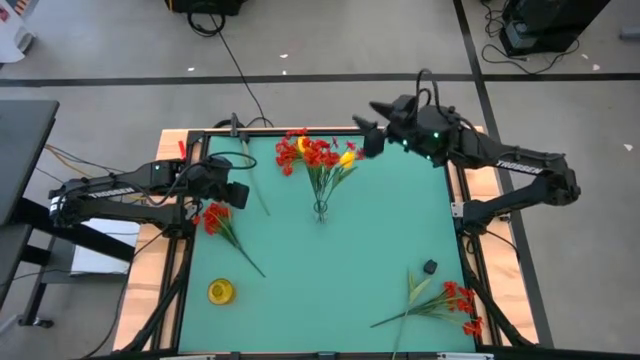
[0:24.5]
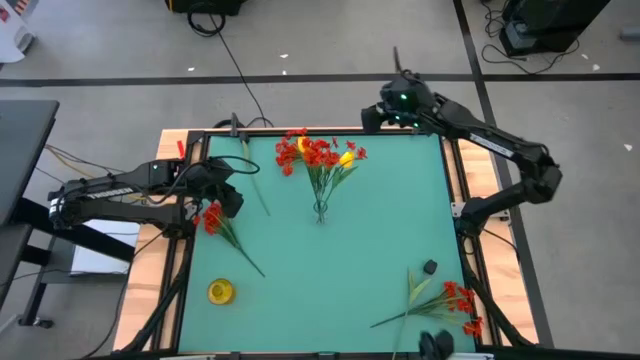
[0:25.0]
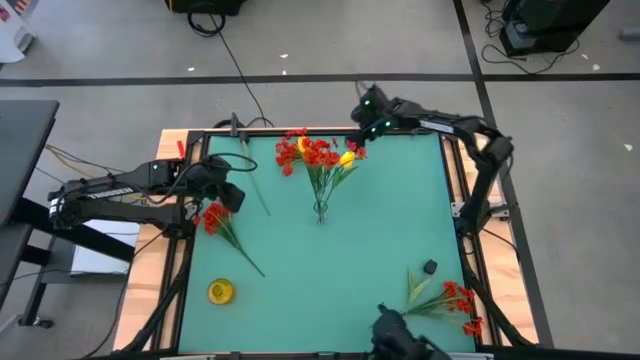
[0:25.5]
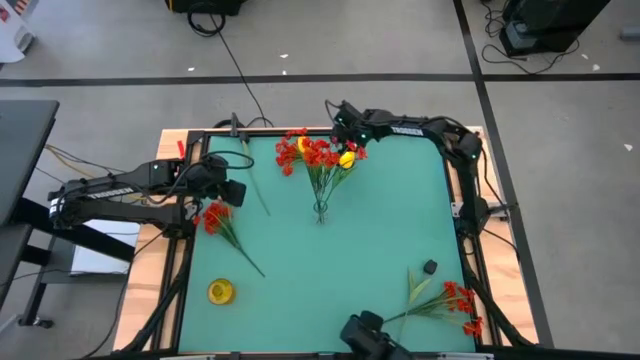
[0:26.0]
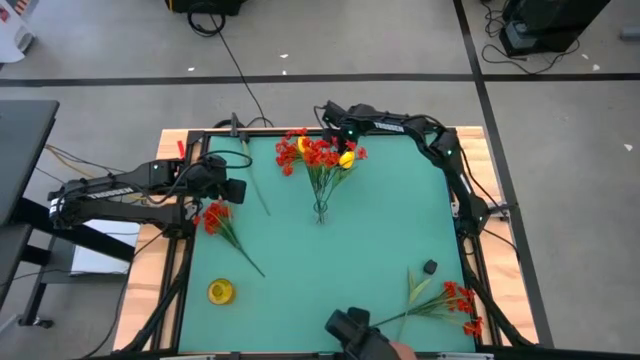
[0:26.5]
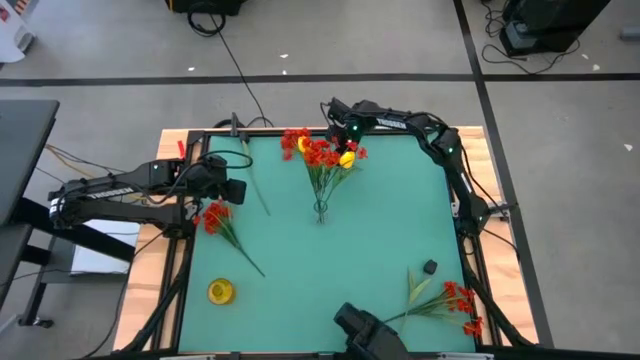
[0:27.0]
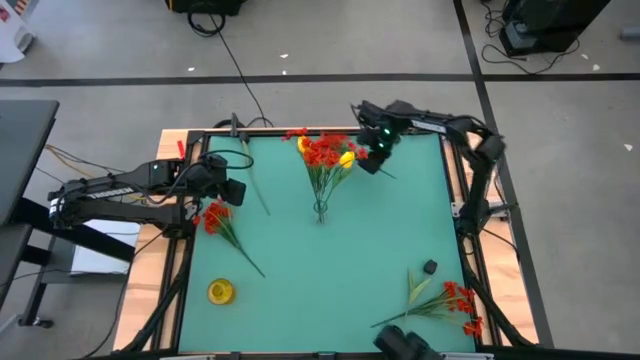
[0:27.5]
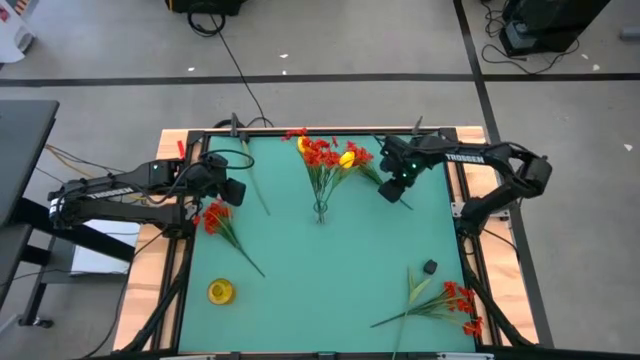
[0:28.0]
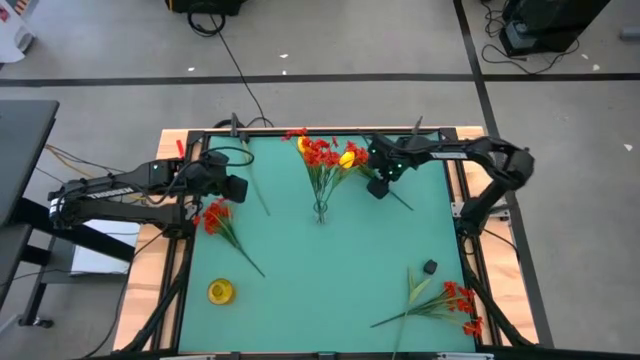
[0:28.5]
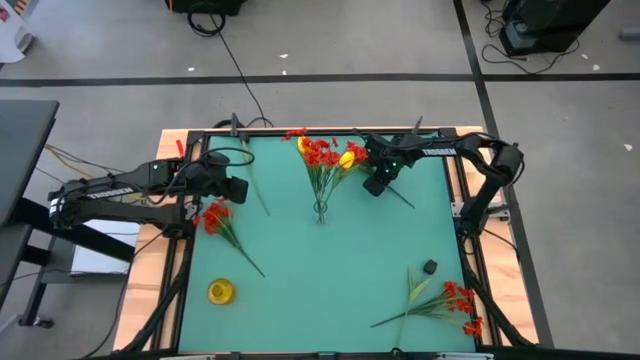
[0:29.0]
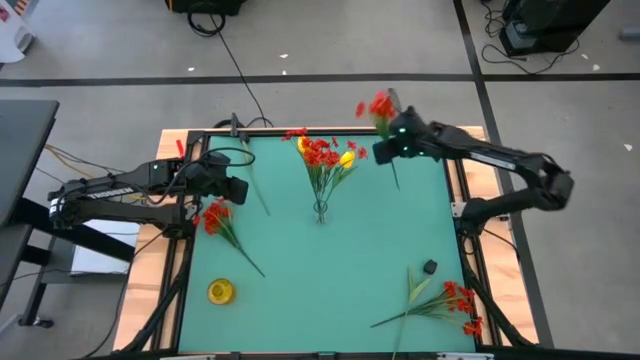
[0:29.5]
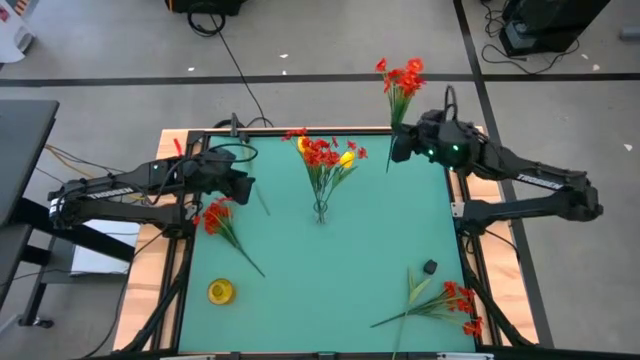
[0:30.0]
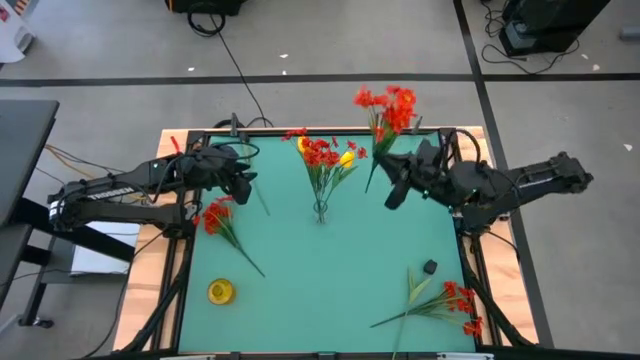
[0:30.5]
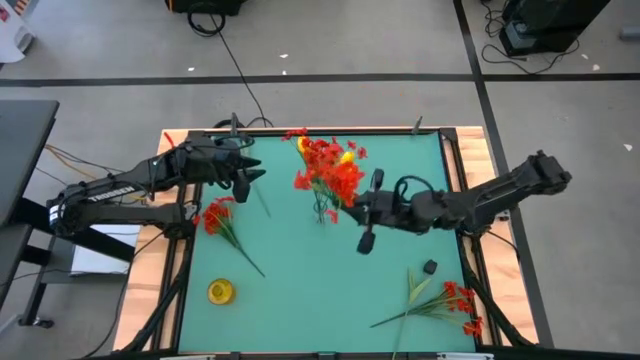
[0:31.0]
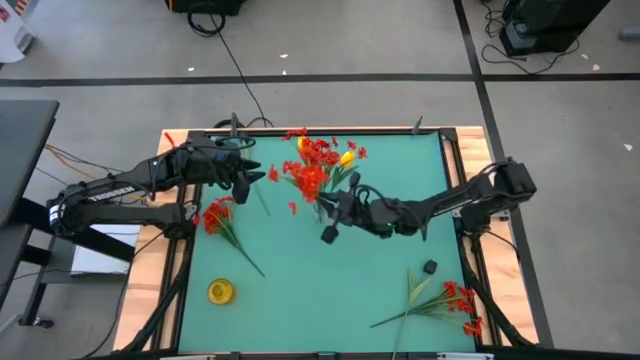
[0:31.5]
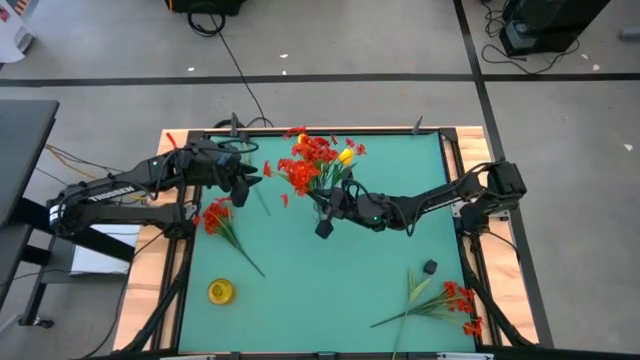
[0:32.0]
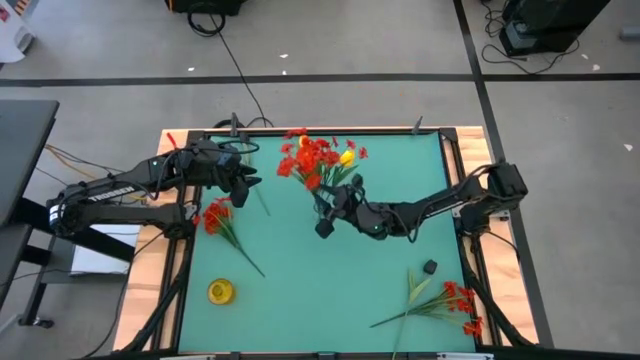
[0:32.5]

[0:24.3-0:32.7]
Task: Sort flowers into vase by color
Put the red flowers into the transparent vase

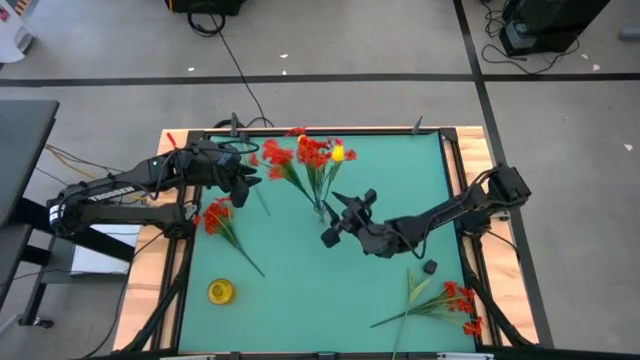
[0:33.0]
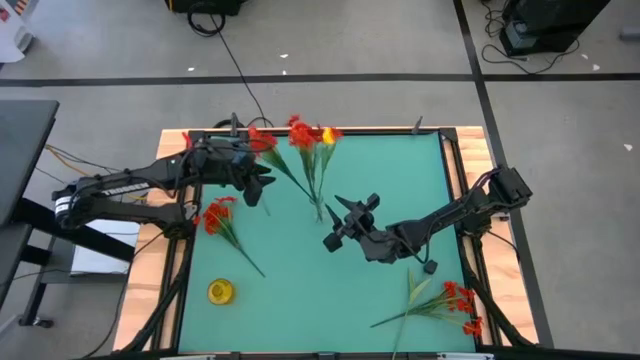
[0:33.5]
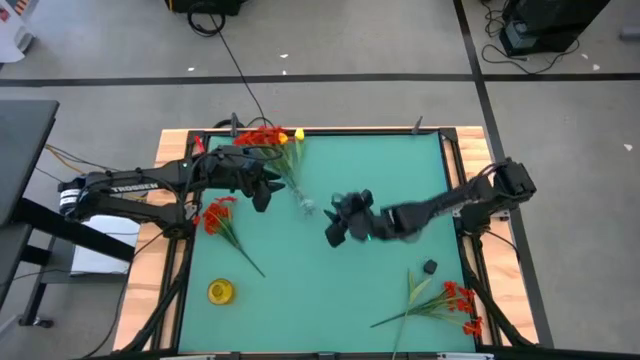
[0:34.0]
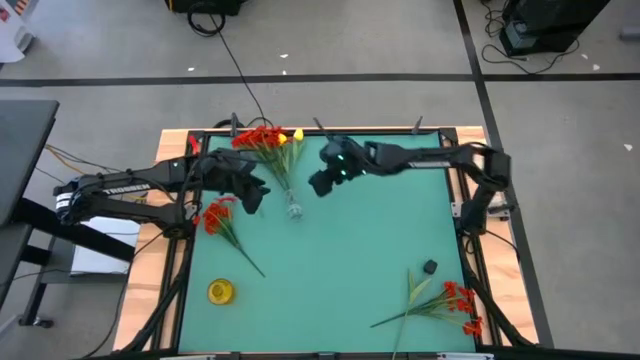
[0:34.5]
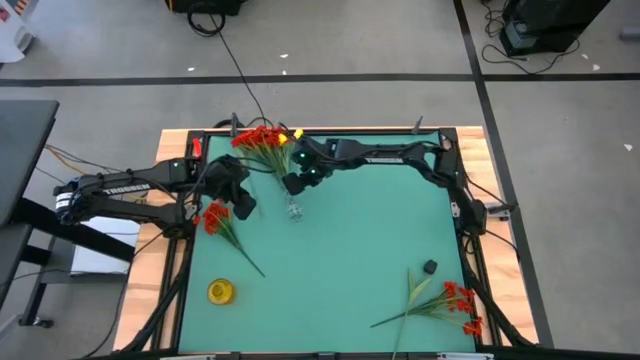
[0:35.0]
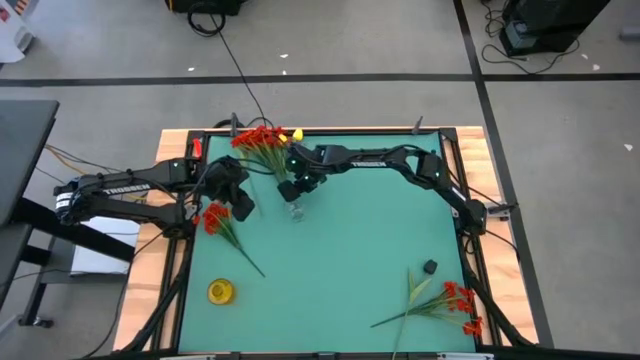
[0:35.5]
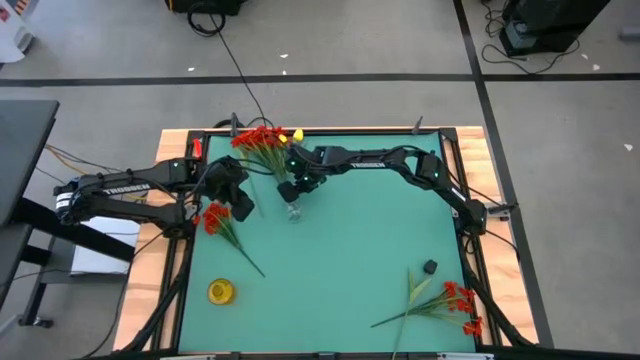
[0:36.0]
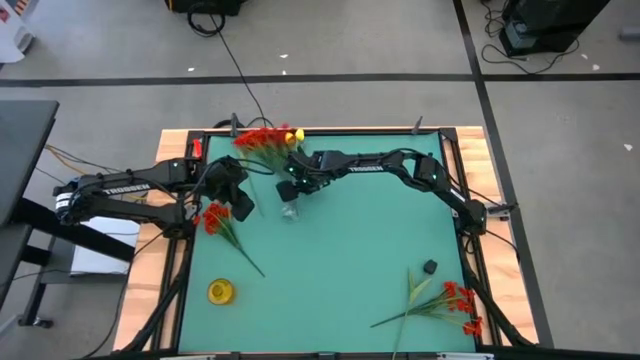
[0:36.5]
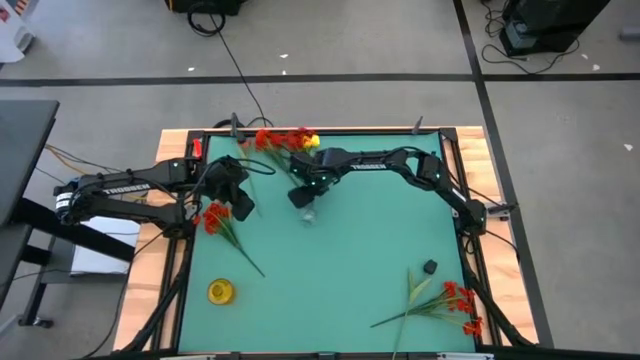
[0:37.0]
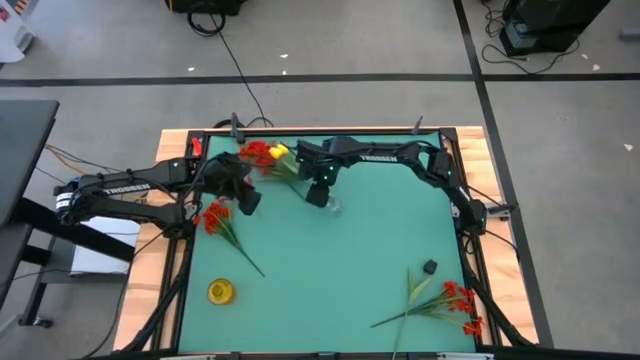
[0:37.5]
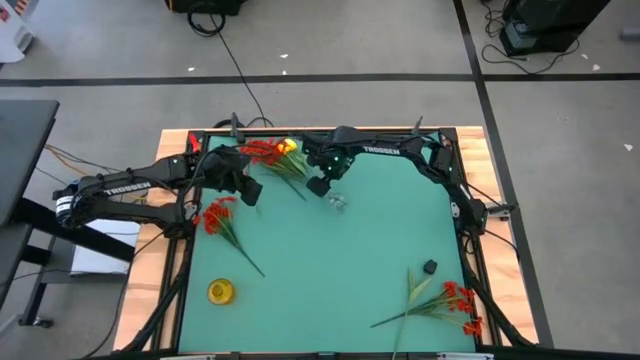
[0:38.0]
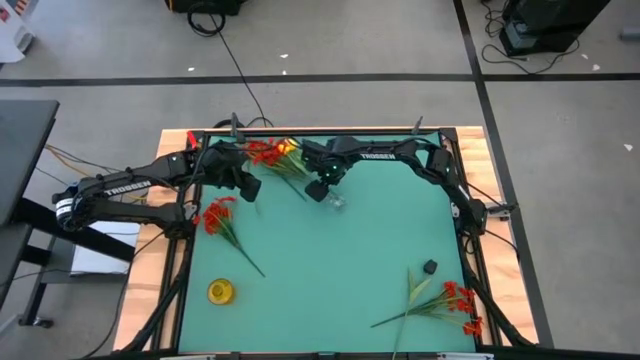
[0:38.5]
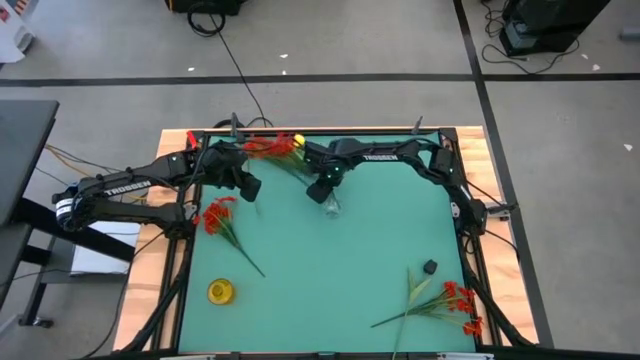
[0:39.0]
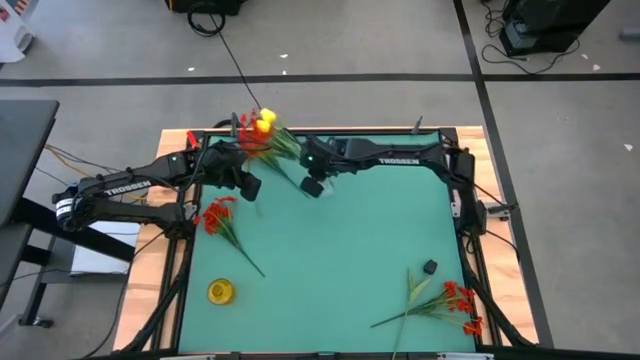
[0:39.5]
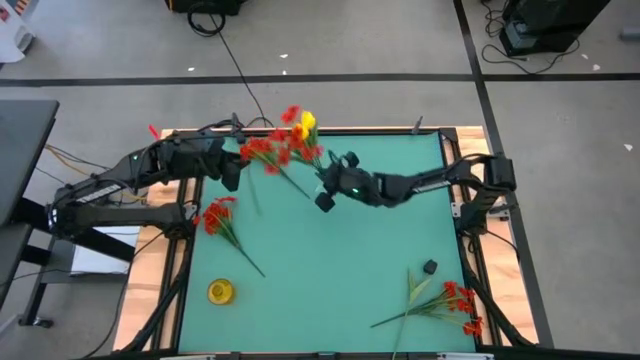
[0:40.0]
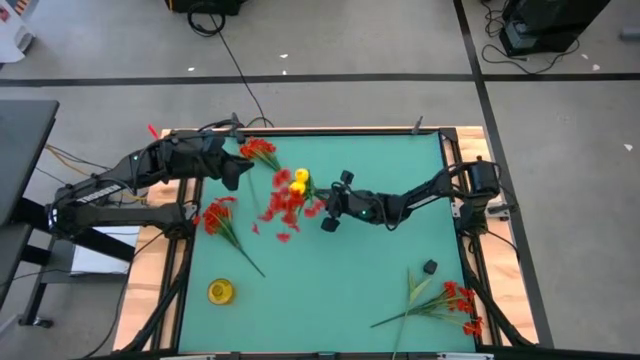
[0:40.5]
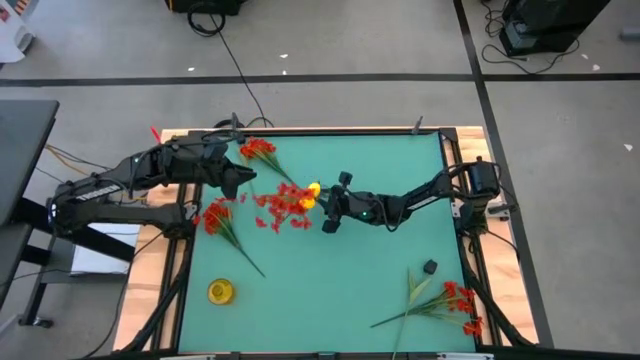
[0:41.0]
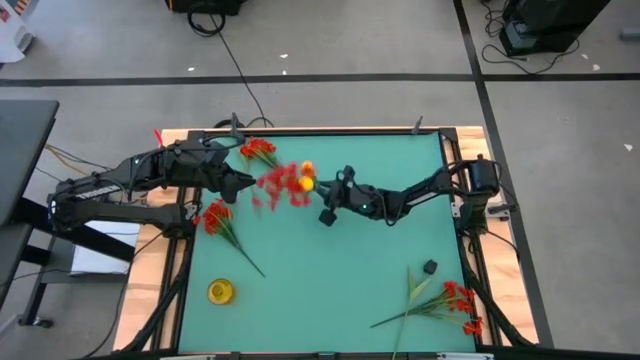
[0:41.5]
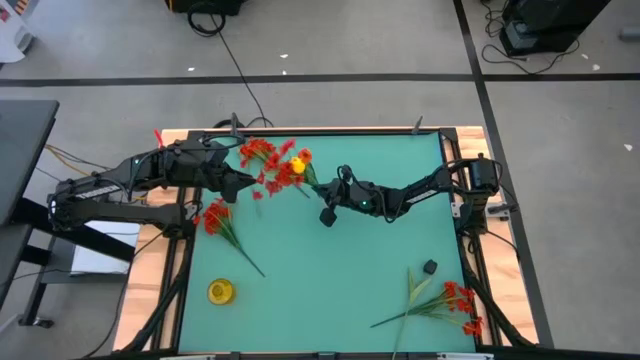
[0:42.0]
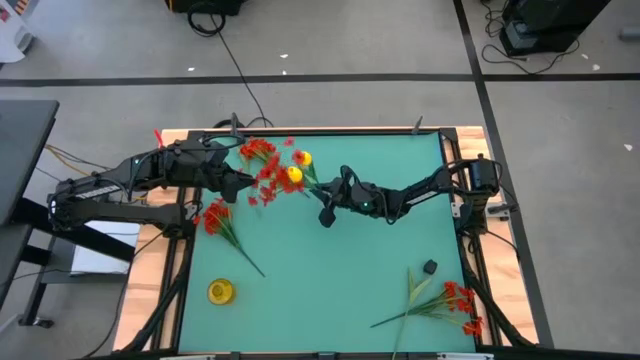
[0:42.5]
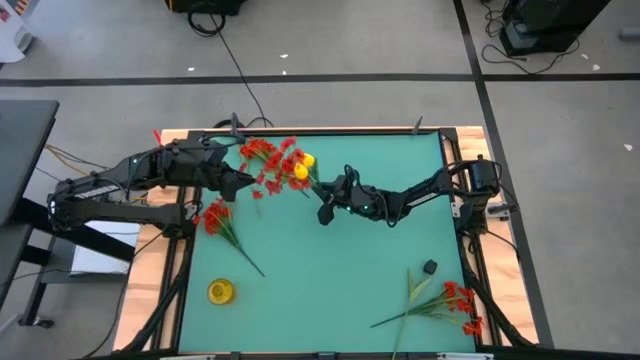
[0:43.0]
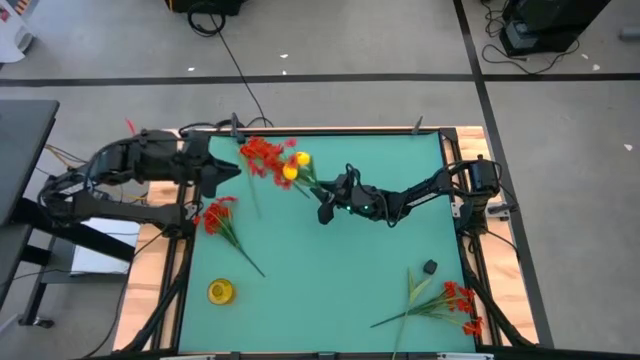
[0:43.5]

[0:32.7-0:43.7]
Adjust the transparent vase

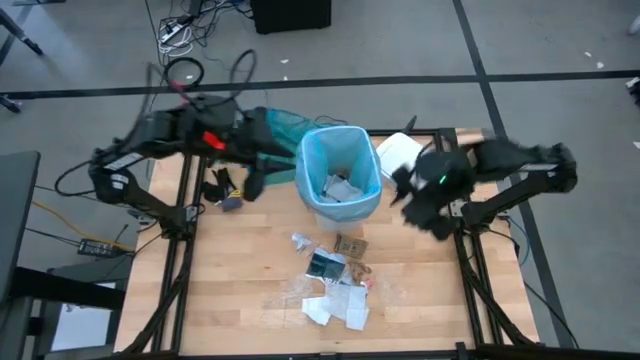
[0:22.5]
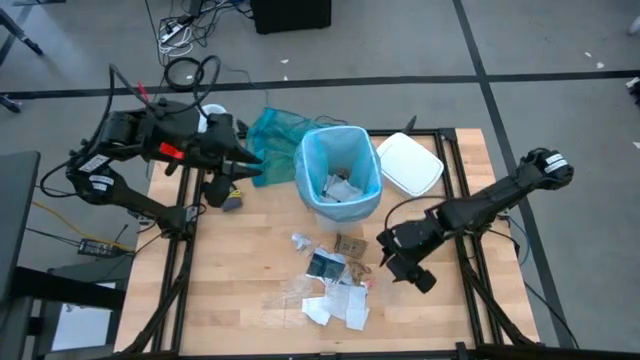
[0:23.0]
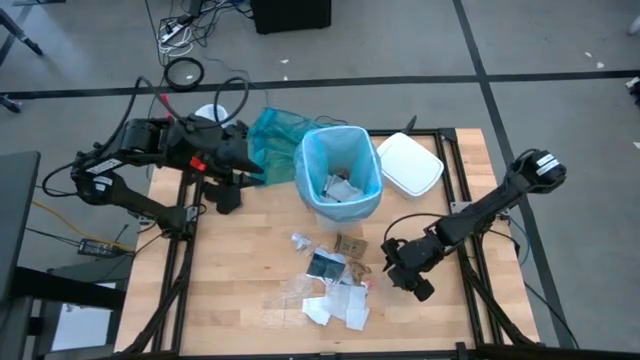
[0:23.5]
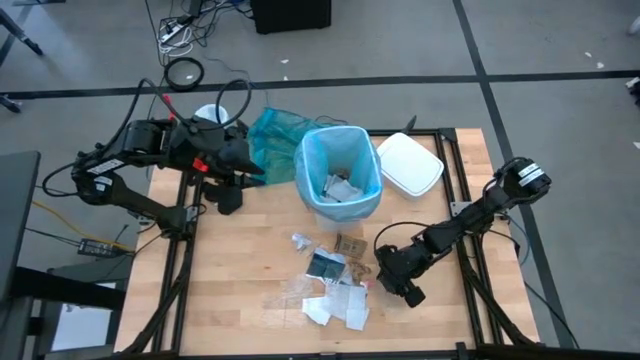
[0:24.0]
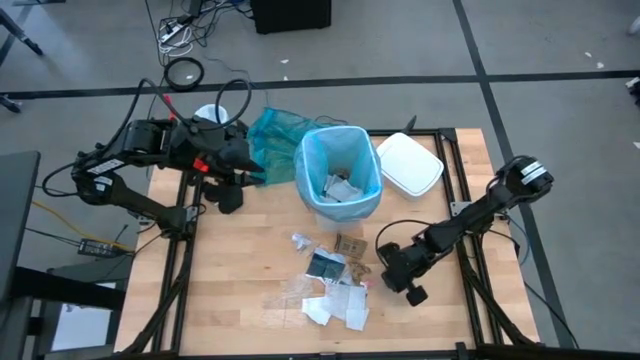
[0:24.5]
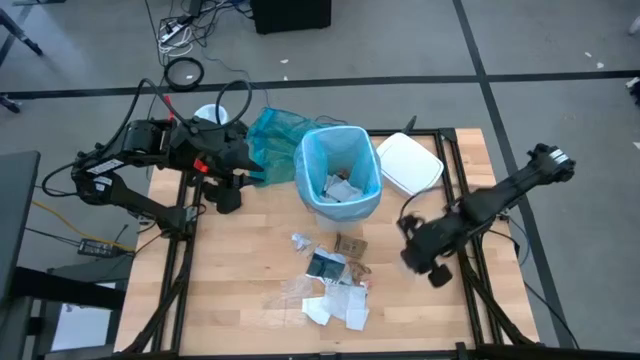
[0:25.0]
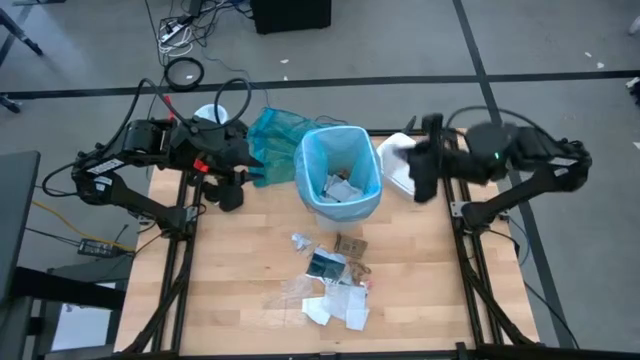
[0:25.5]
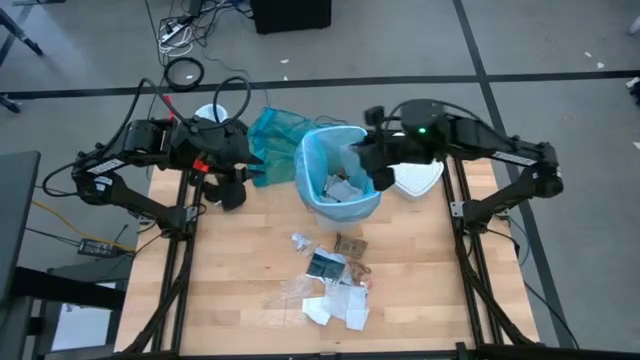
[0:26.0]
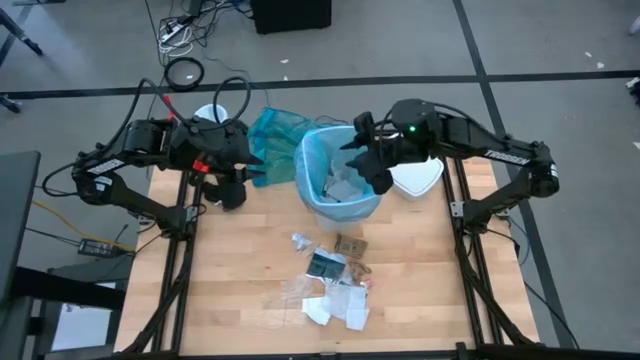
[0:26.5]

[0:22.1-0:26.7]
Task: place trash/remove bag and relplace
Put the clear plastic into the white trash bin
